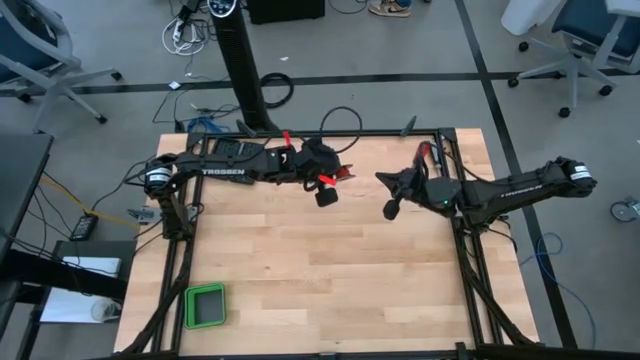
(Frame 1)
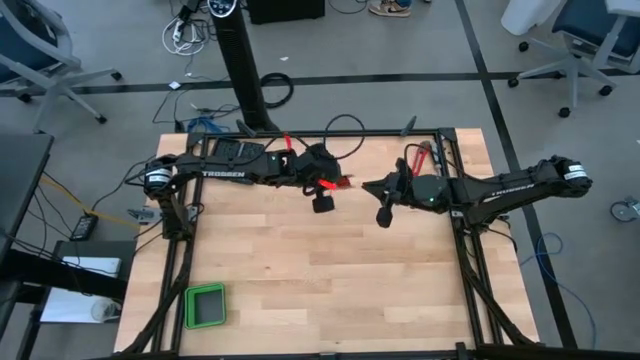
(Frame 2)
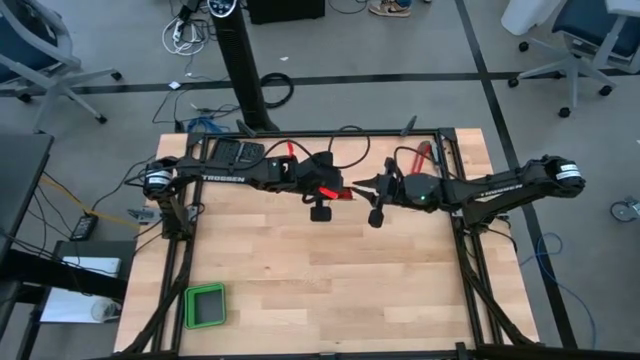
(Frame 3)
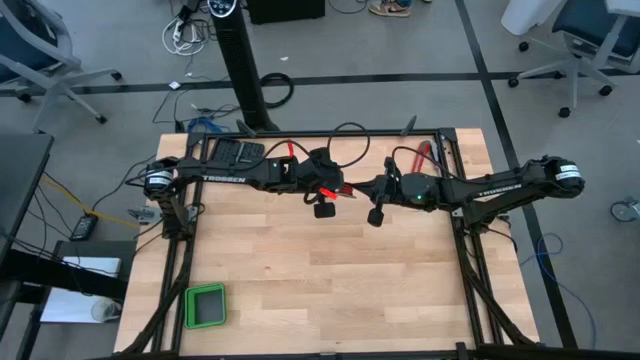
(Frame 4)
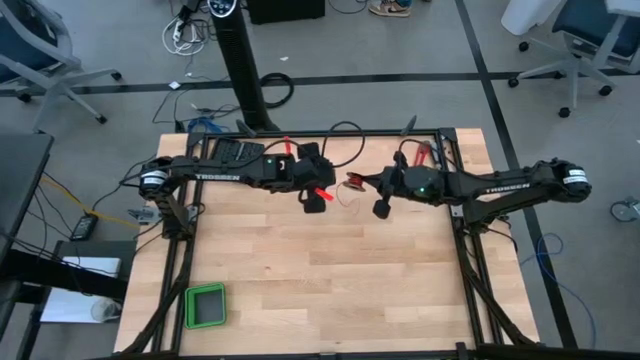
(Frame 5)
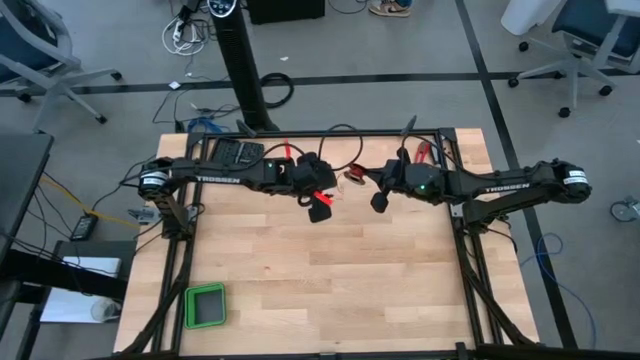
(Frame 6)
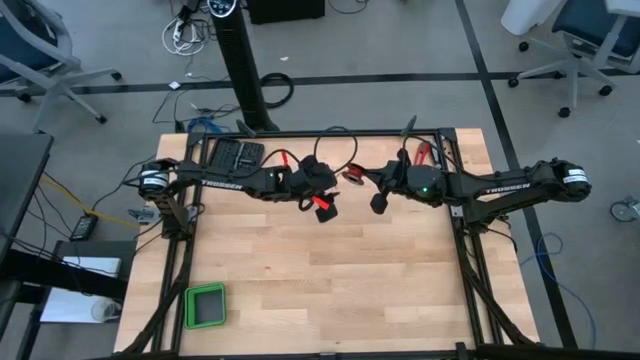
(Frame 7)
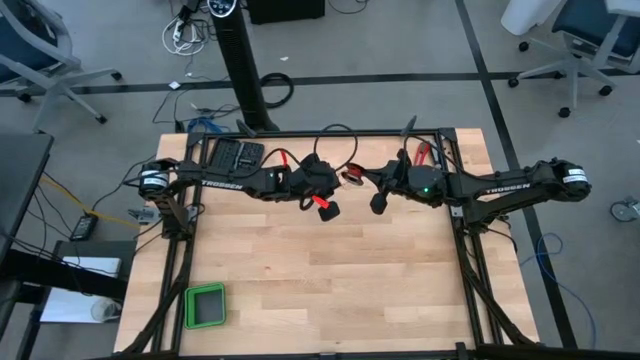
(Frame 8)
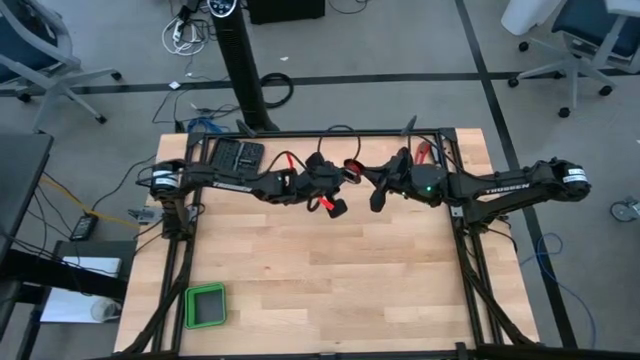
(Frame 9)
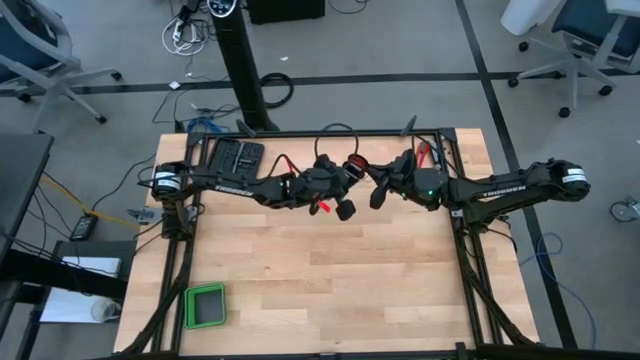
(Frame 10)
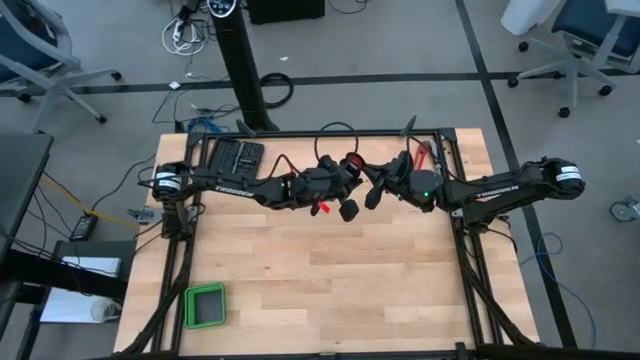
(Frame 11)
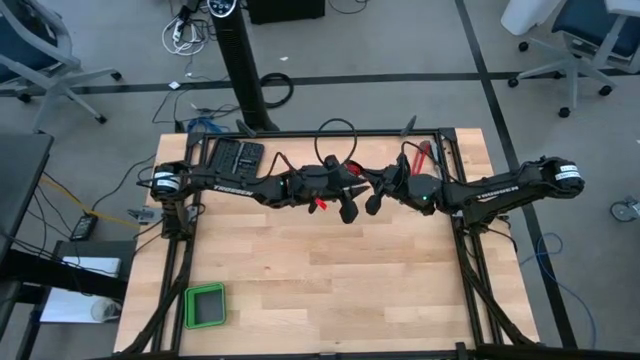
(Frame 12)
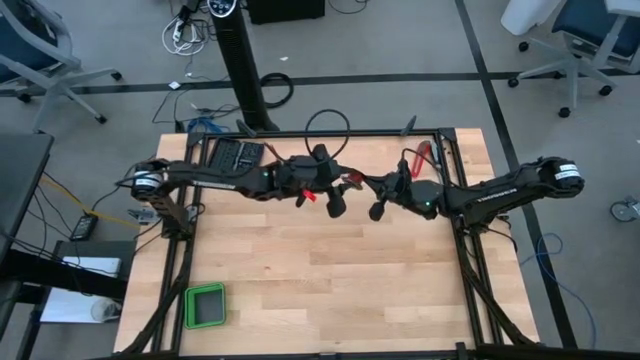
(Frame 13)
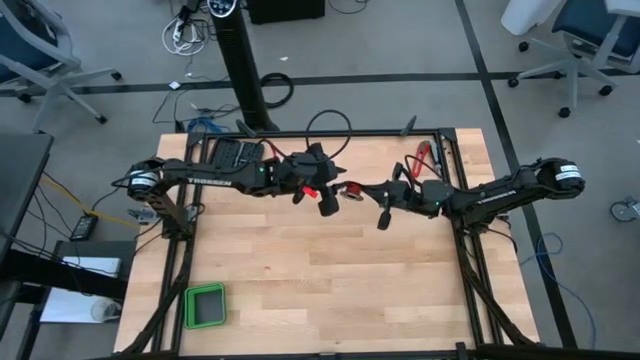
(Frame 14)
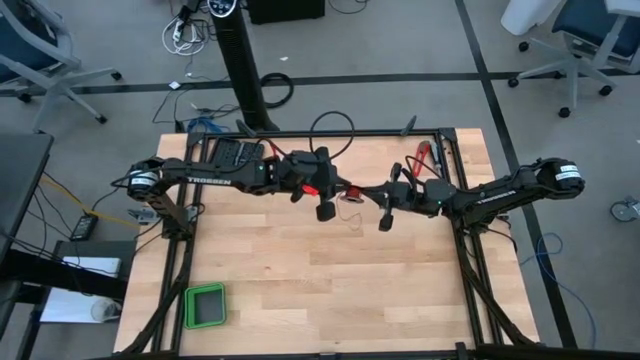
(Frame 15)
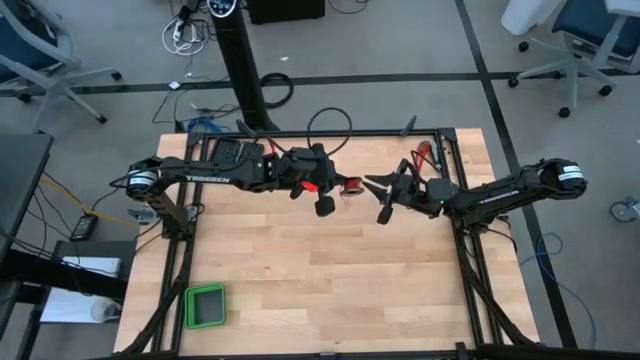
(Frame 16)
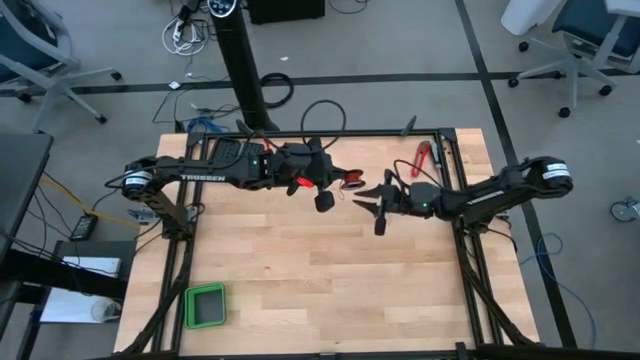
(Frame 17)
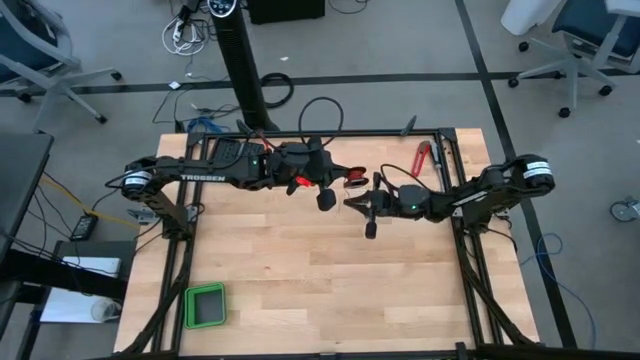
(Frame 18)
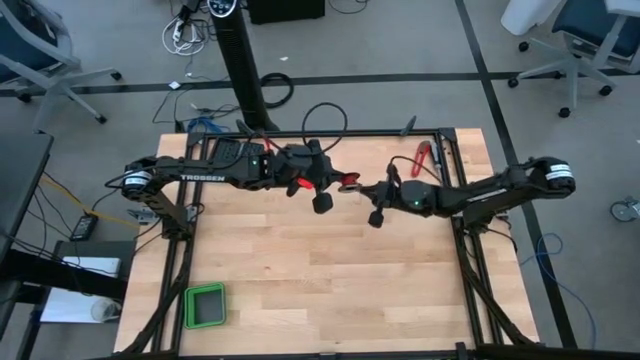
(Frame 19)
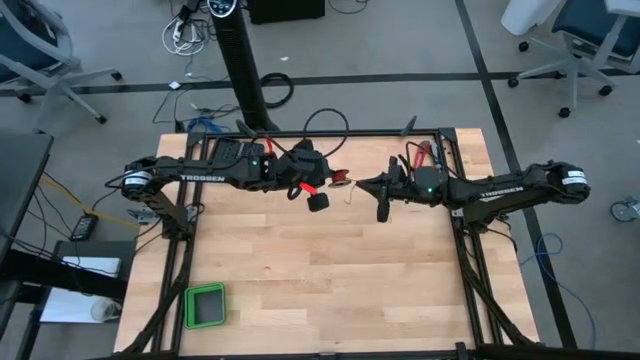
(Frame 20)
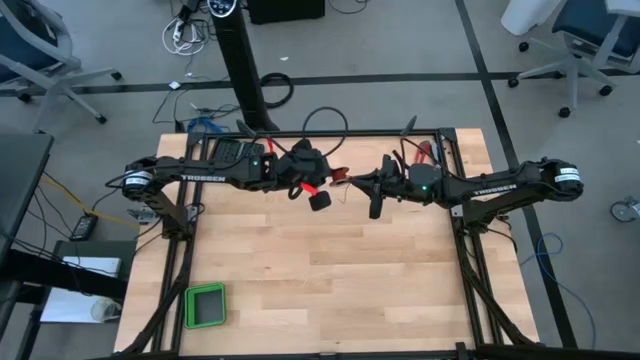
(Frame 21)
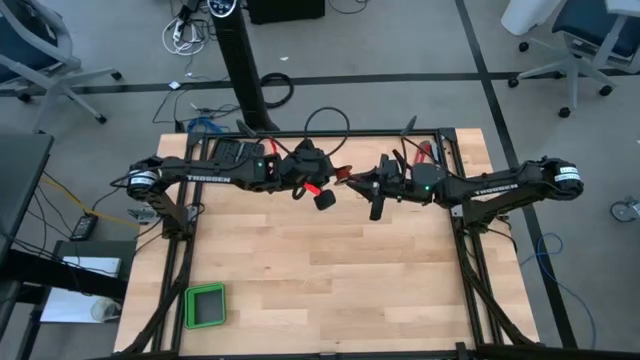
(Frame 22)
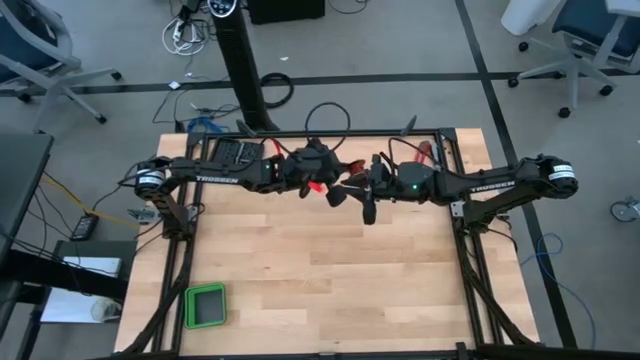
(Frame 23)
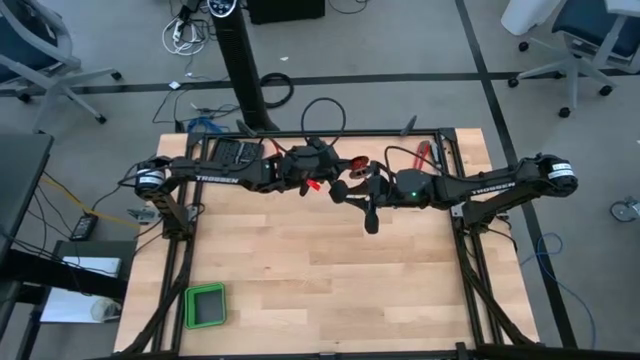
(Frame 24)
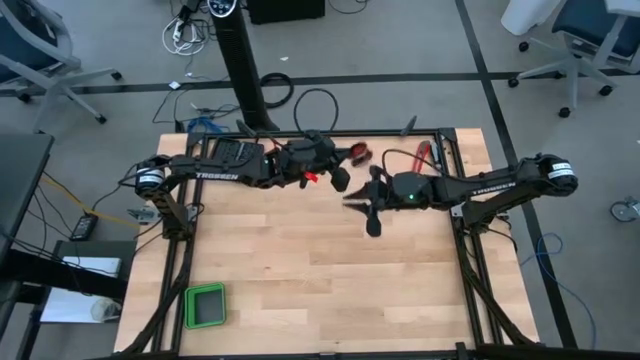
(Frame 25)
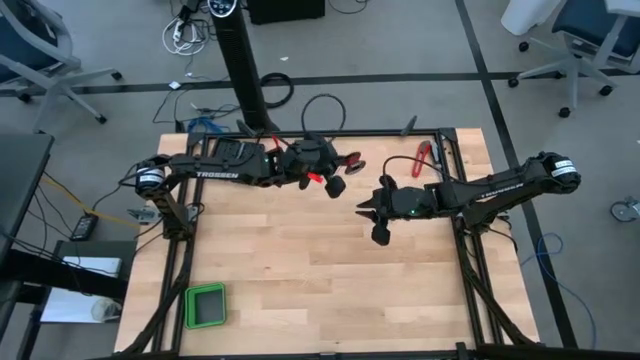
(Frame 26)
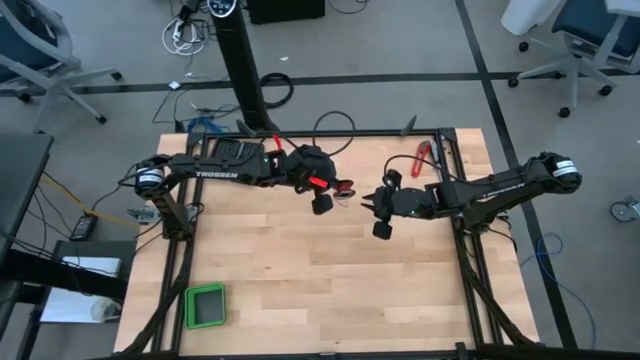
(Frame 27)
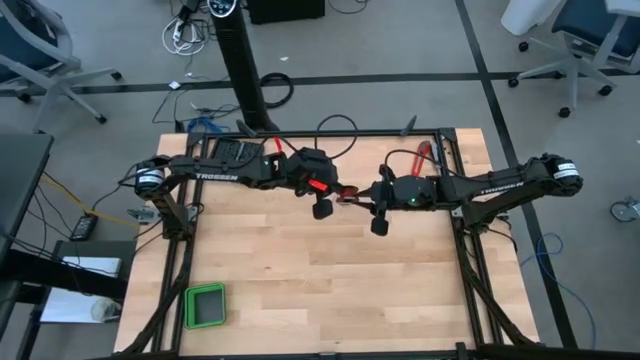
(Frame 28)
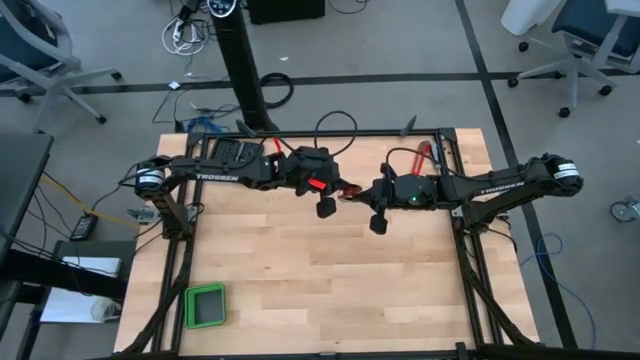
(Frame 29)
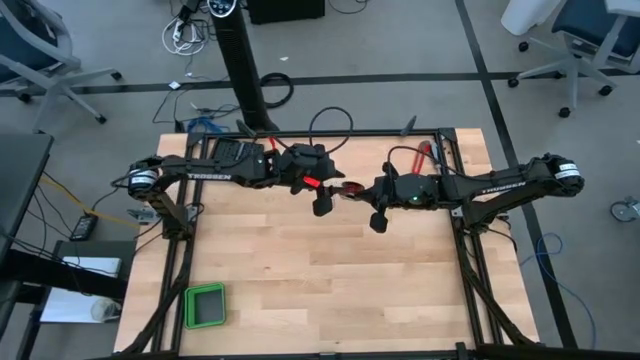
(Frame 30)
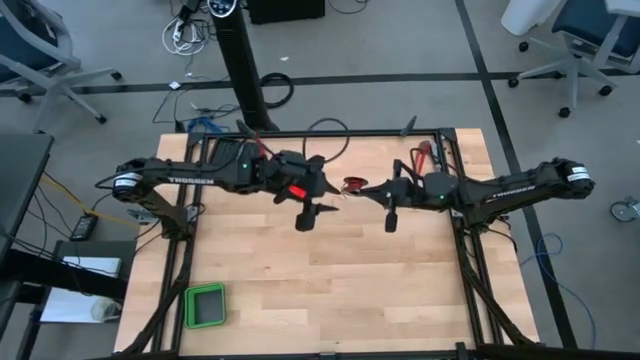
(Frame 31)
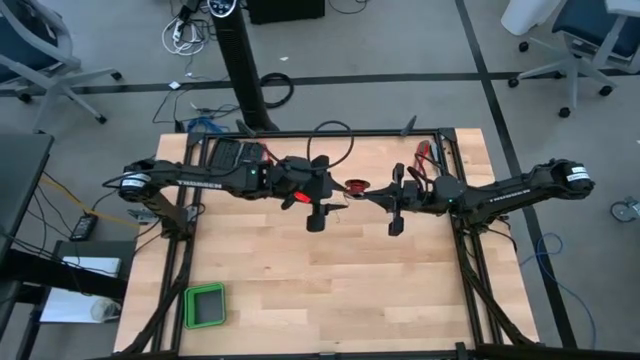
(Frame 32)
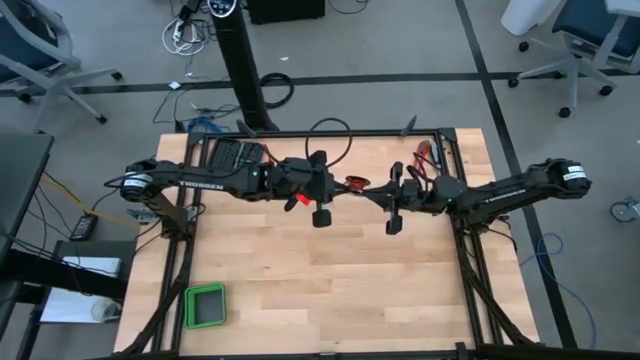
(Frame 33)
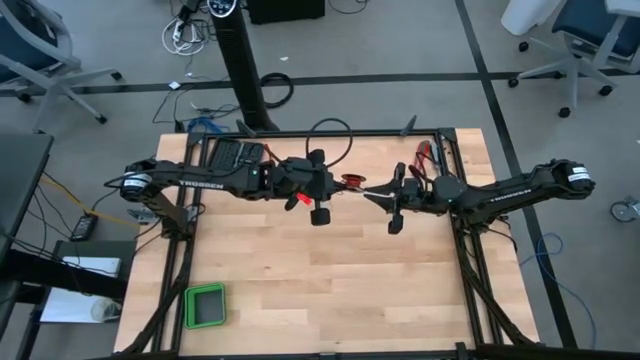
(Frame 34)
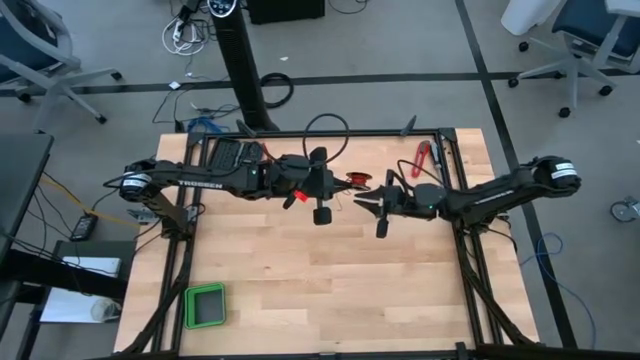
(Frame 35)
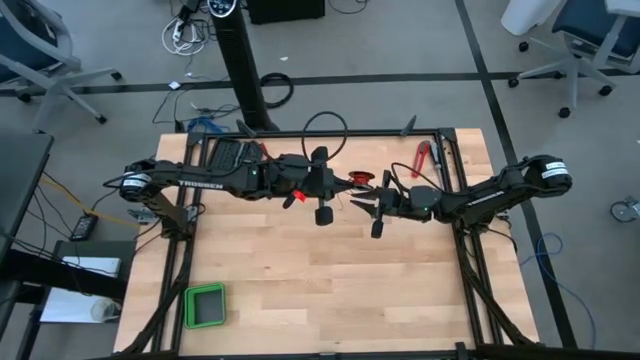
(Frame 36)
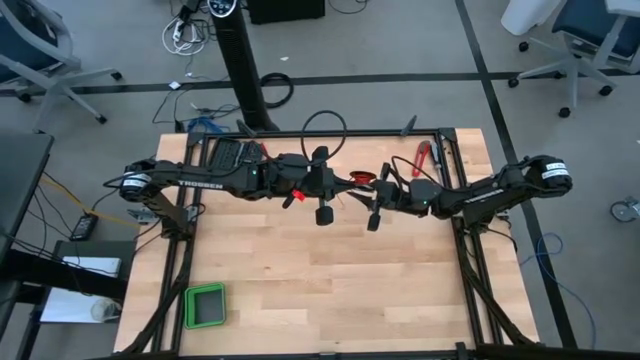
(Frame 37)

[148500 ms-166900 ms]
Task: Coil cords
Coil the red wire onto the black spool

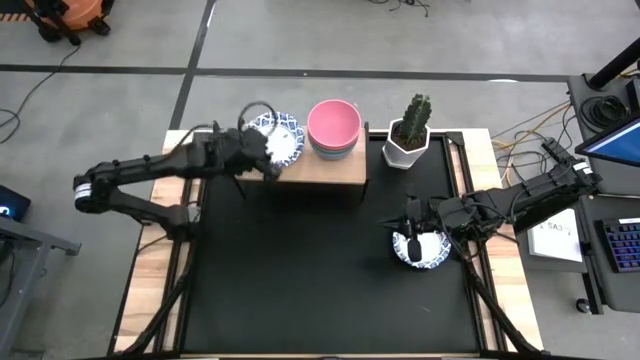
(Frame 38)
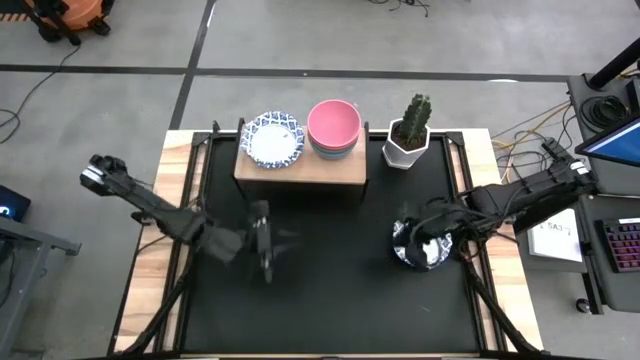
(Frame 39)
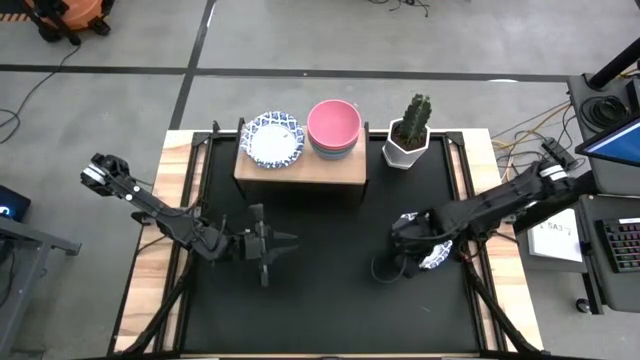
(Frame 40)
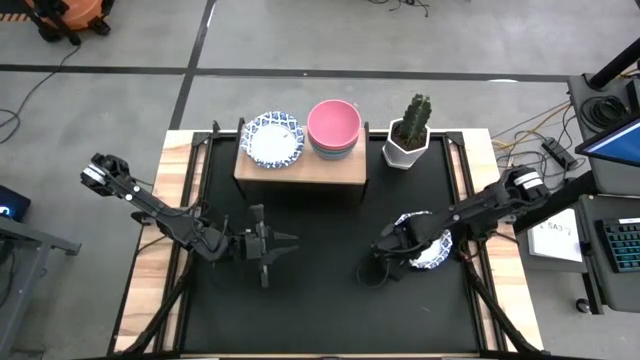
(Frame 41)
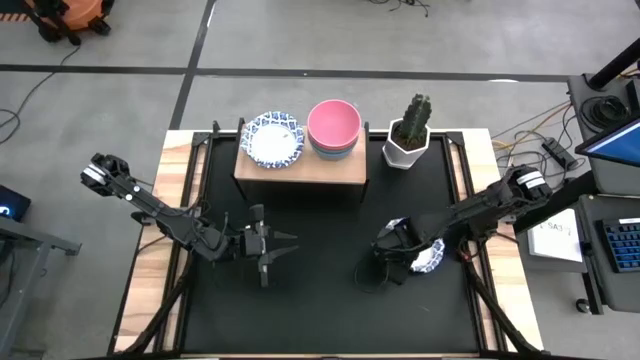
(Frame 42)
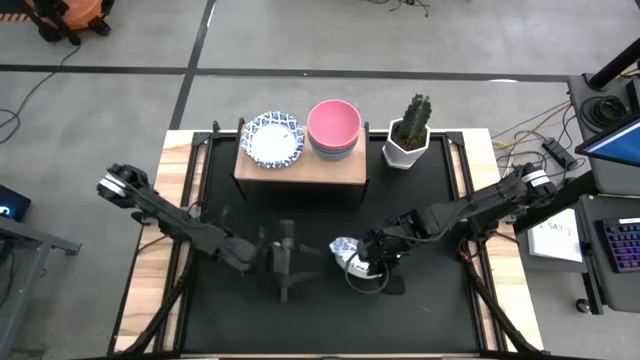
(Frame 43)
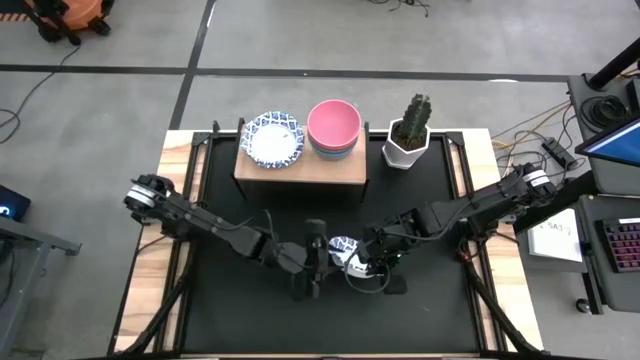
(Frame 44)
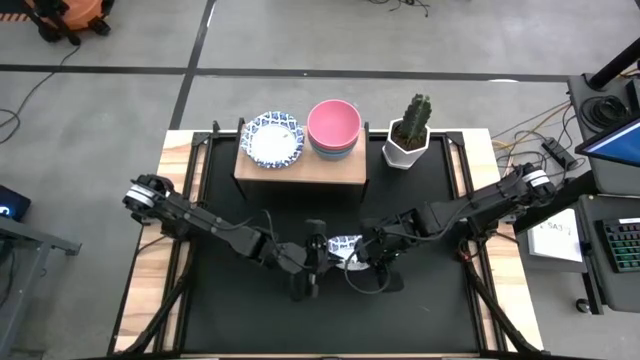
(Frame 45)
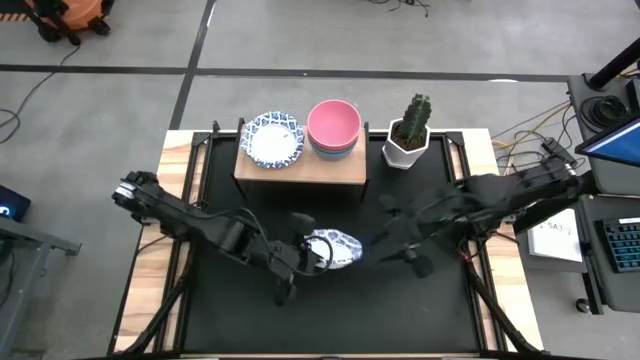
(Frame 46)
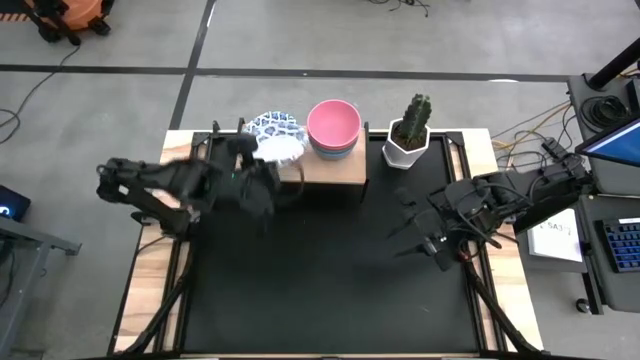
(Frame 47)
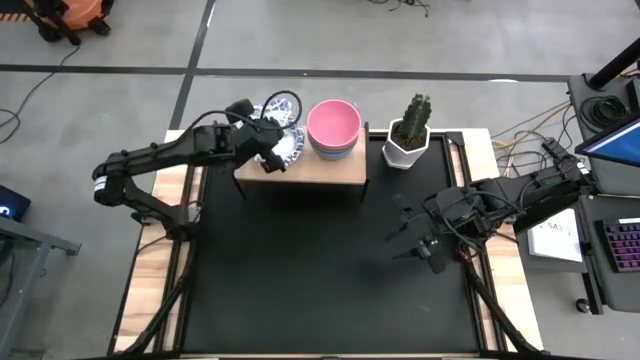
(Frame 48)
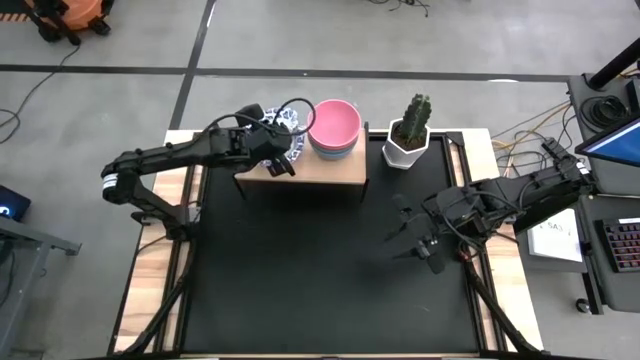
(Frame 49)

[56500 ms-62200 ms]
Task: Place and stack bowls onto a shelf
Stack the blue patterned bowl on top of the blue patterned bowl on the shelf
